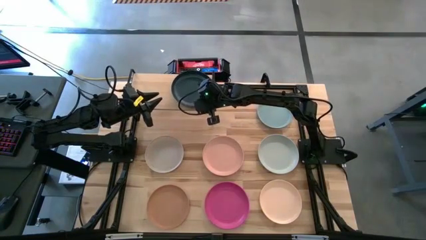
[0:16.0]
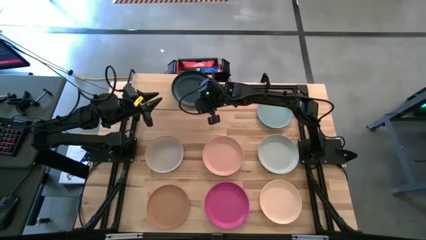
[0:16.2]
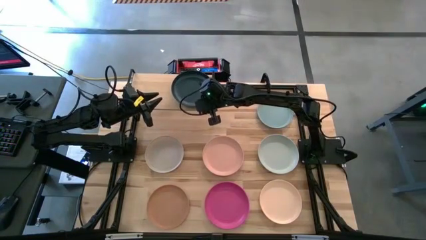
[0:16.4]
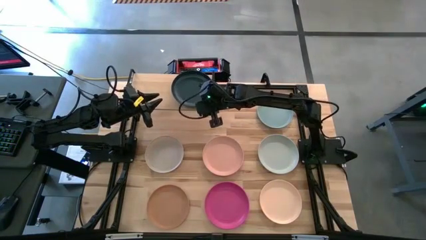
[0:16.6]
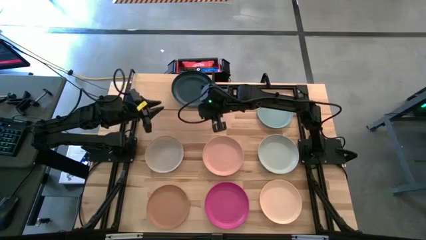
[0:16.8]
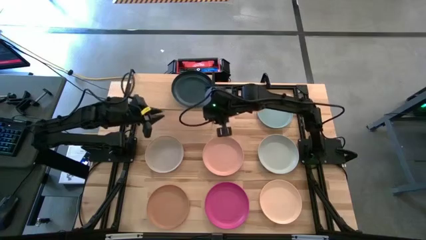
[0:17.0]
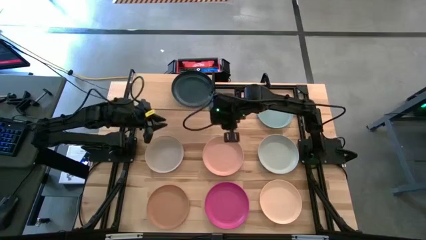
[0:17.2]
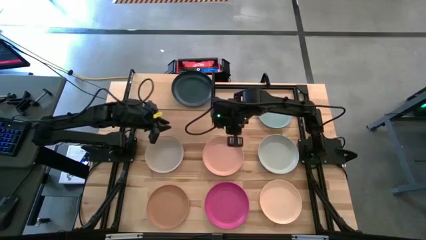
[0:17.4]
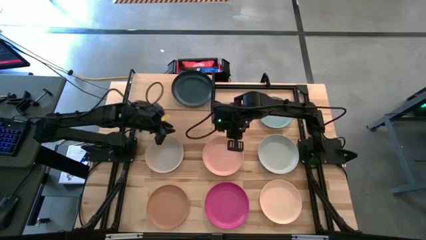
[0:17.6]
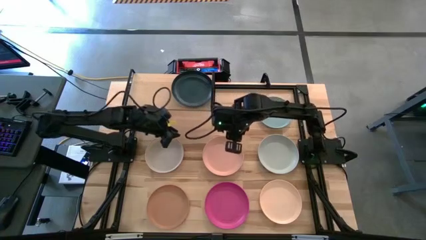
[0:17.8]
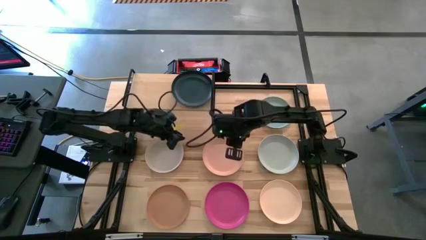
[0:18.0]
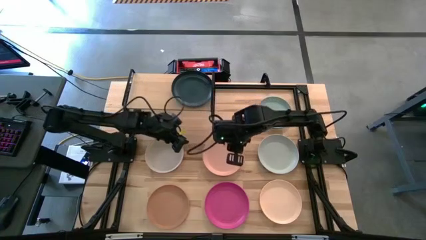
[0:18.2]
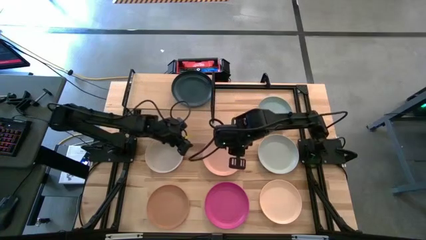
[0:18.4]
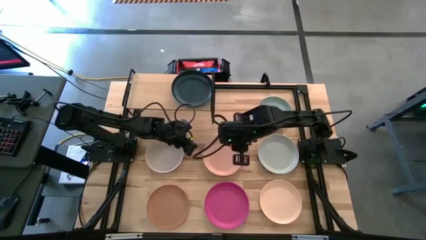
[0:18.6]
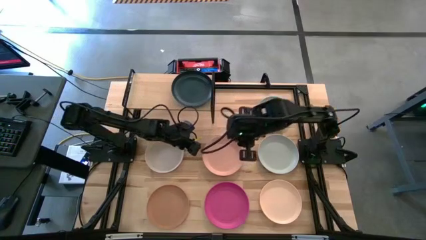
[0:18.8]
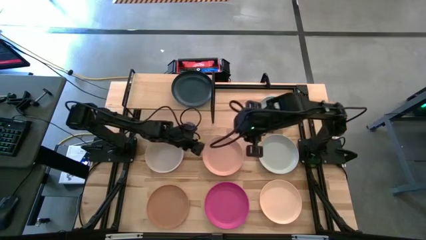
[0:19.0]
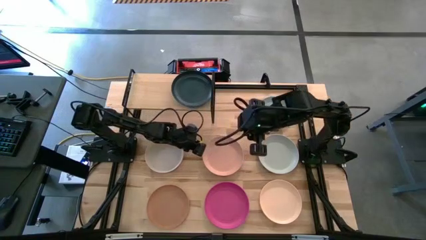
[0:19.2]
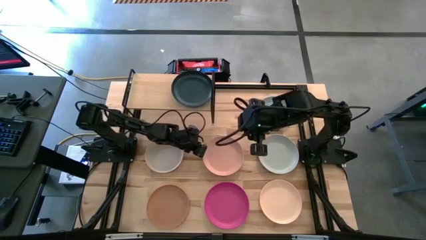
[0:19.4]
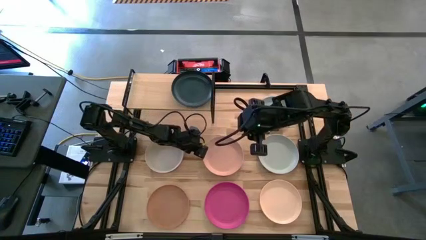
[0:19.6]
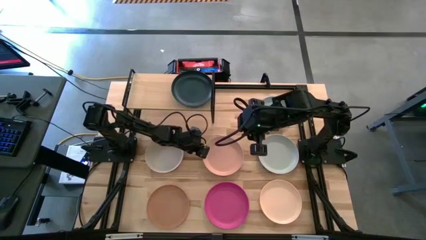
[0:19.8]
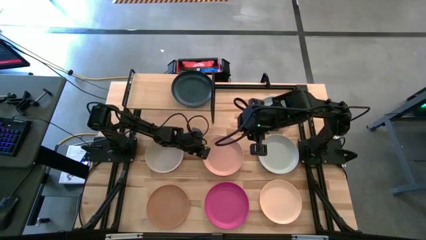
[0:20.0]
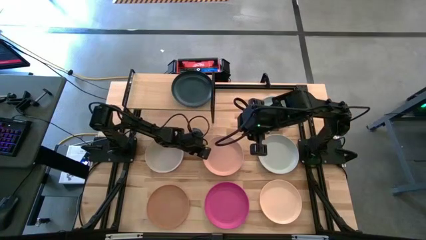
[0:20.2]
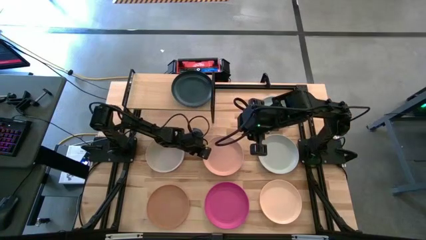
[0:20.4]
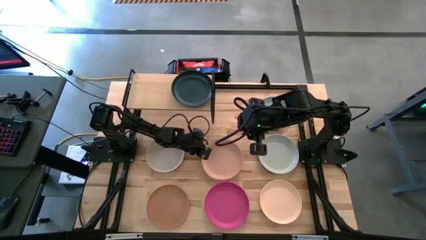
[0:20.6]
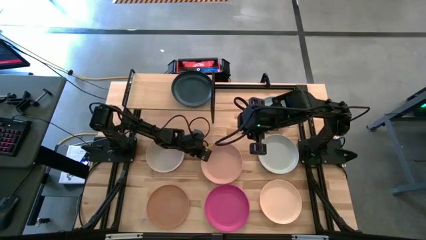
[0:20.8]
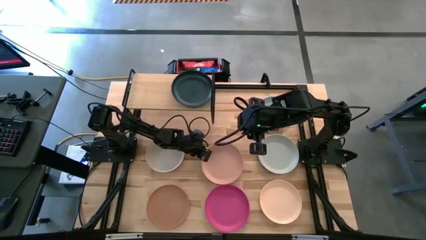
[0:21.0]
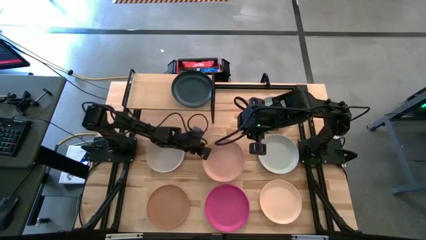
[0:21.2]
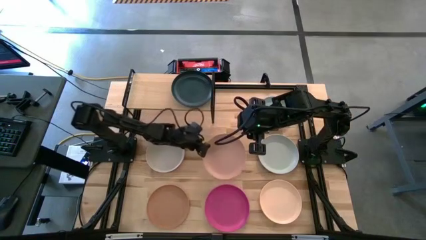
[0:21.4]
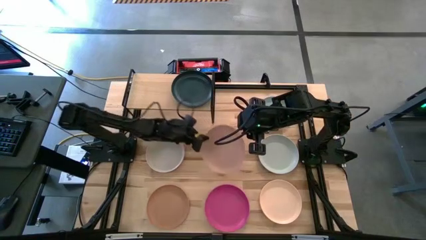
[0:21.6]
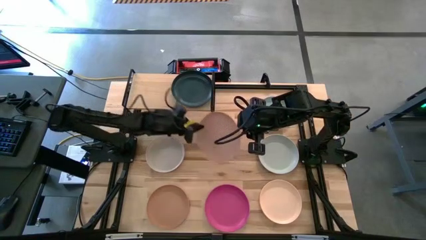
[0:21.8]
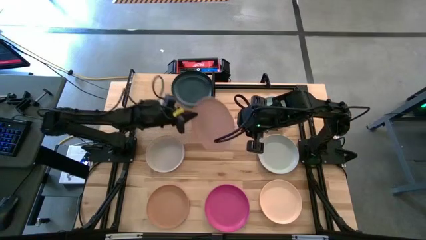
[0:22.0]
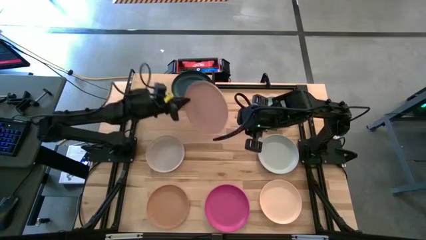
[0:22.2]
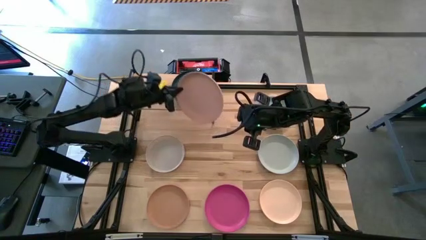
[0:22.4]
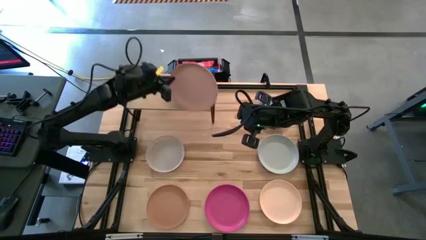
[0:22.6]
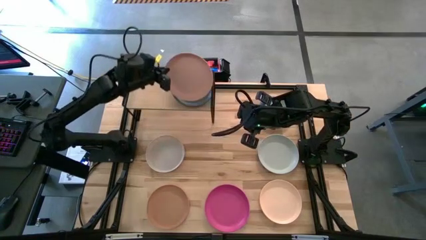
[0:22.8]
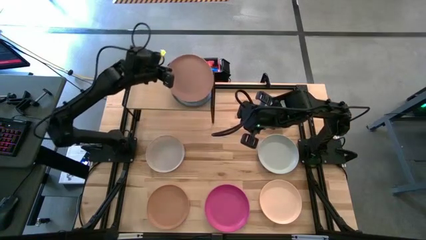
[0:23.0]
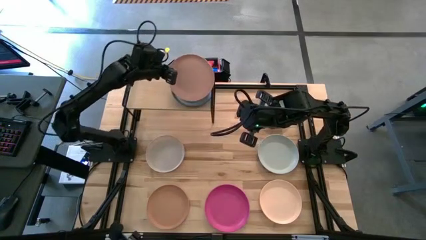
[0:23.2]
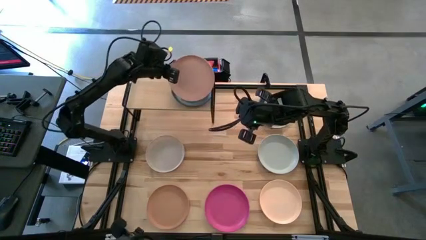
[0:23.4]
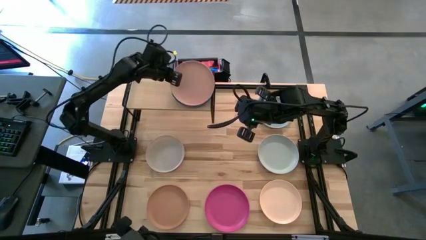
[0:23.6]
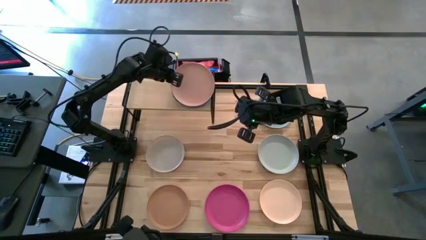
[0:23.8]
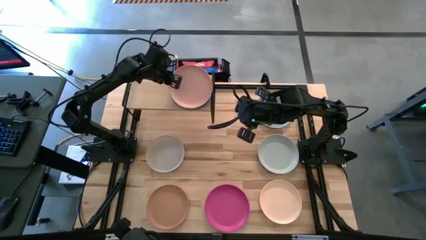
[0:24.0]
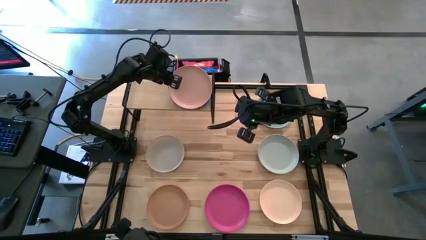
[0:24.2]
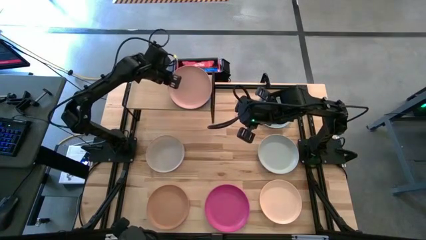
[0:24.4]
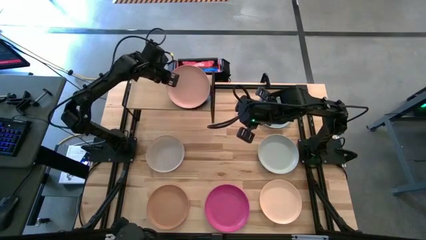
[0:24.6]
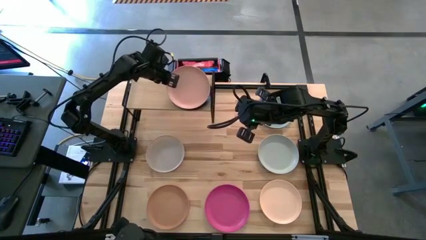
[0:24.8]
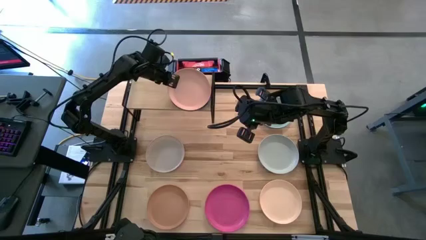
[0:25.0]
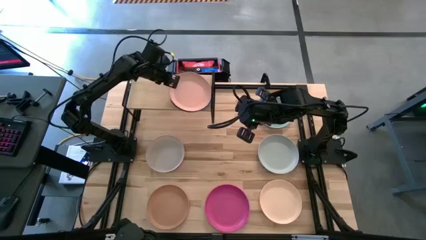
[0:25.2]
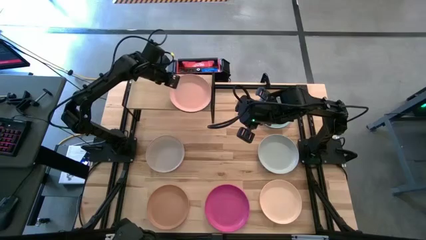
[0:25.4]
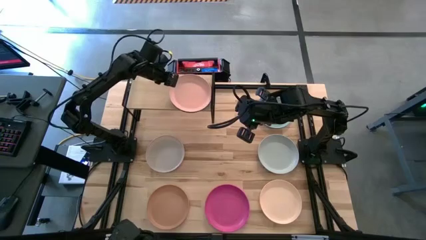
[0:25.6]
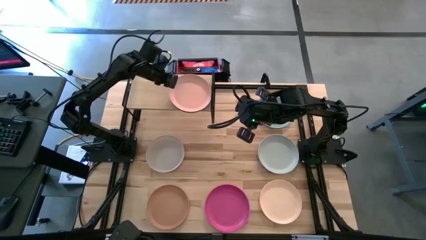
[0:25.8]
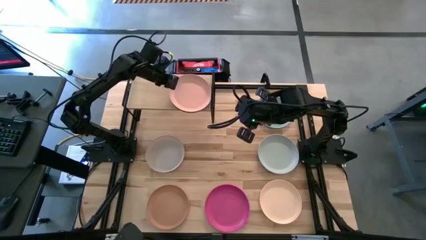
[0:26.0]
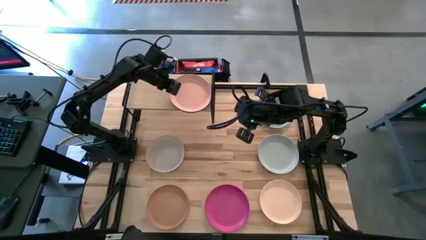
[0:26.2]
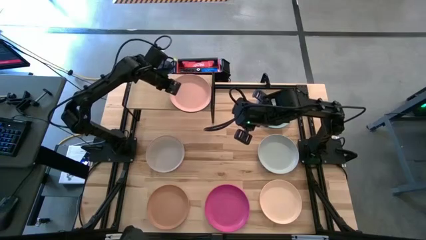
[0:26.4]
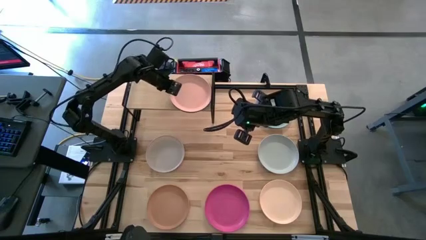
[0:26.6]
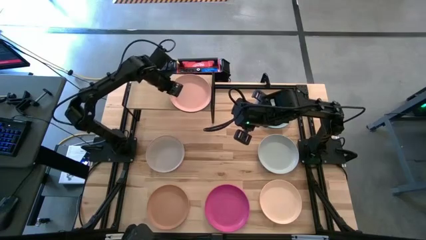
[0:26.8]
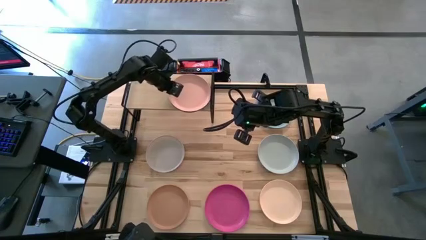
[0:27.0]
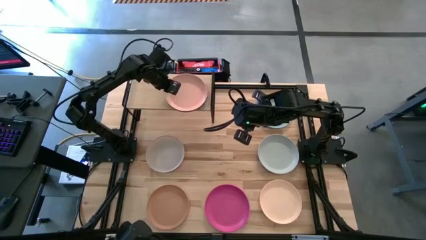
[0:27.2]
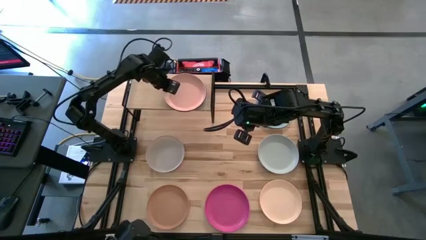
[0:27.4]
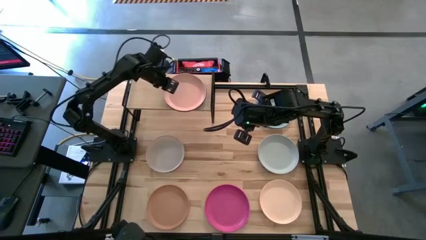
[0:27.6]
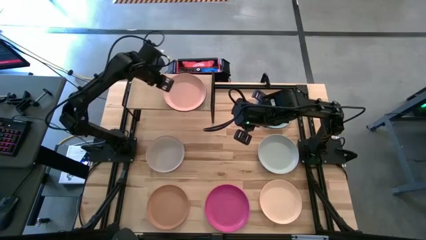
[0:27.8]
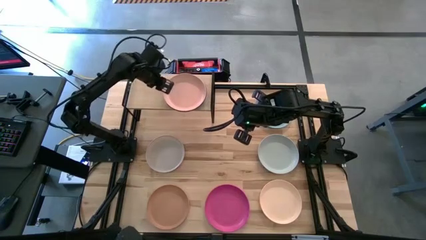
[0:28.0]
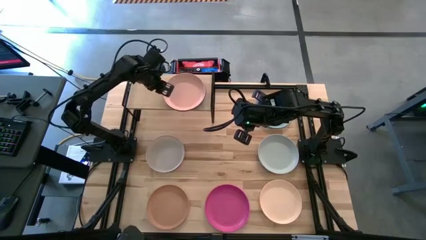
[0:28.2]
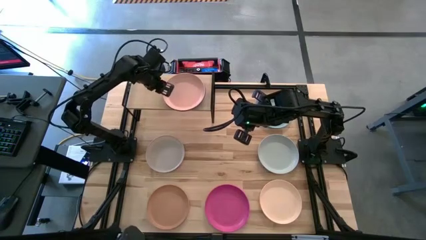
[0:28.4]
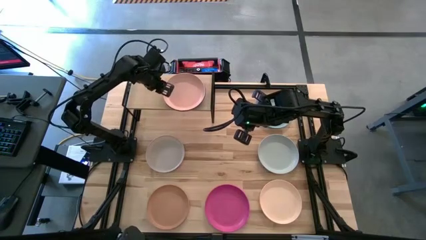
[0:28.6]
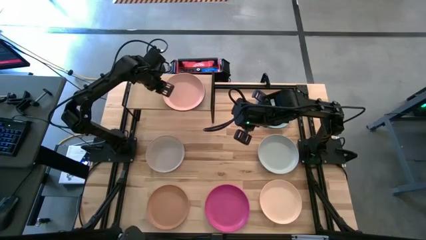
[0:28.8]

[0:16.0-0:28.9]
Task: Place and stack plates onto a shelf
Stack the light pink plate on the black plate on the shelf
